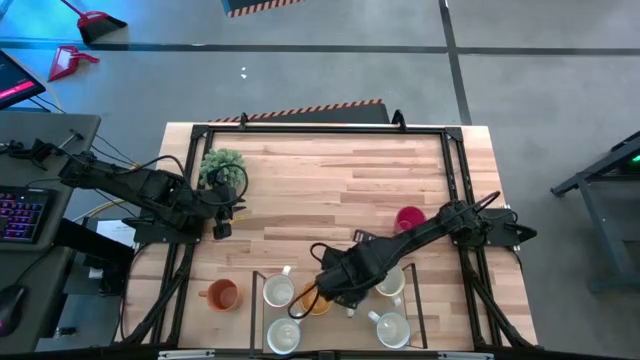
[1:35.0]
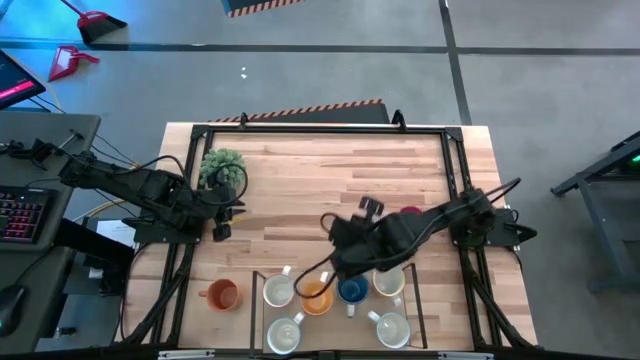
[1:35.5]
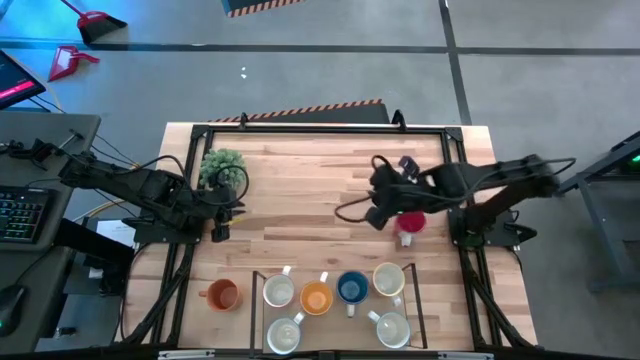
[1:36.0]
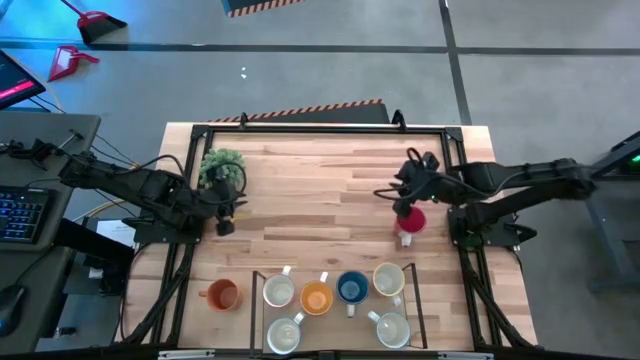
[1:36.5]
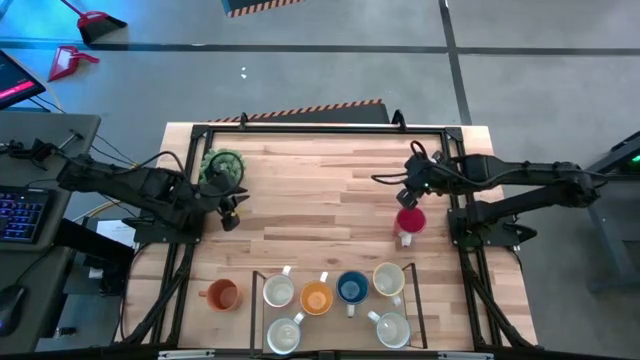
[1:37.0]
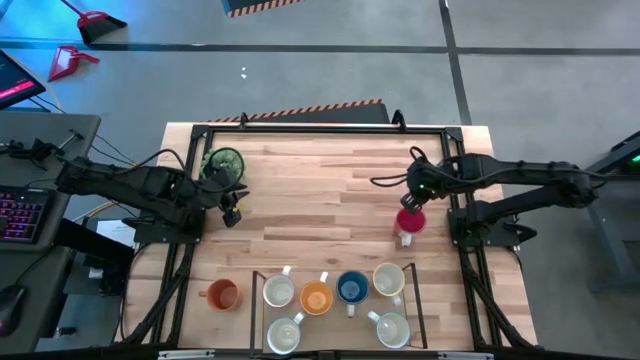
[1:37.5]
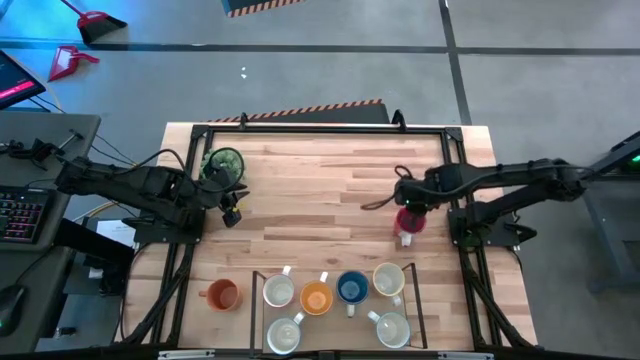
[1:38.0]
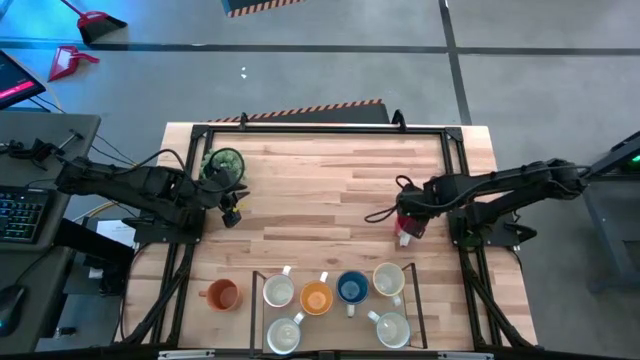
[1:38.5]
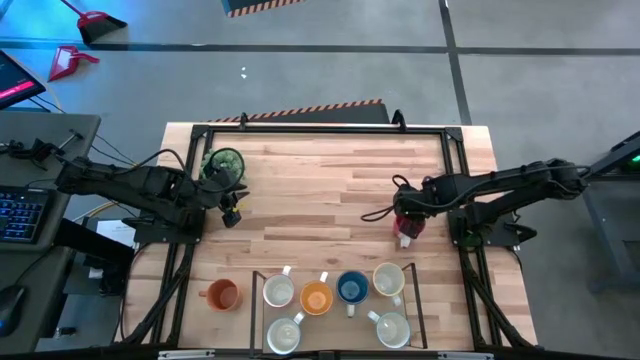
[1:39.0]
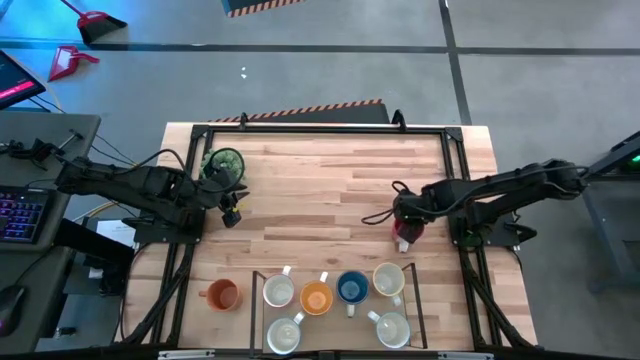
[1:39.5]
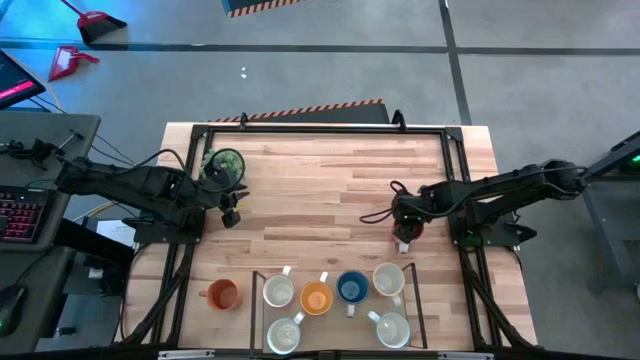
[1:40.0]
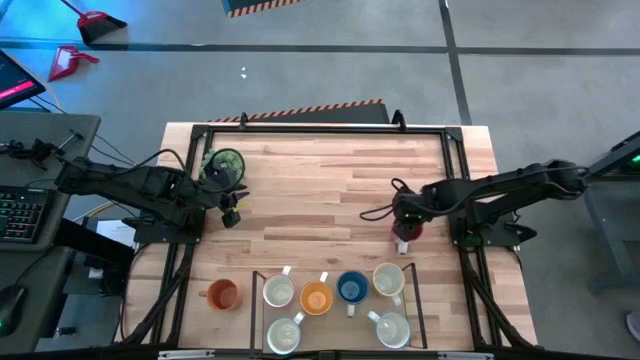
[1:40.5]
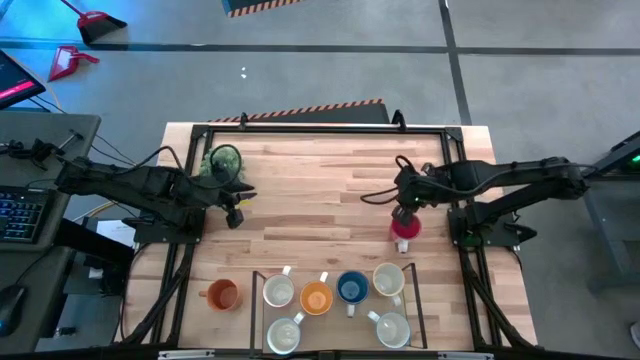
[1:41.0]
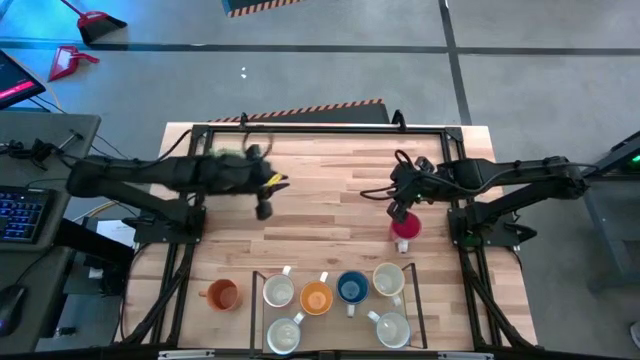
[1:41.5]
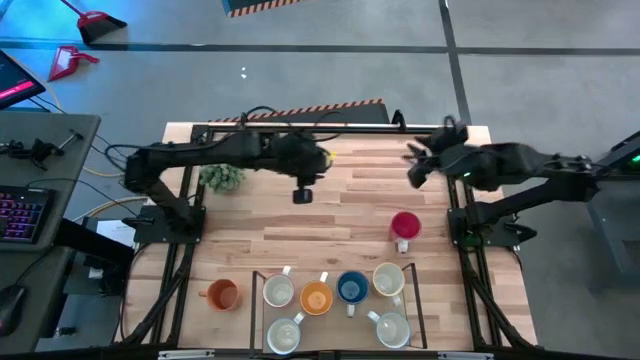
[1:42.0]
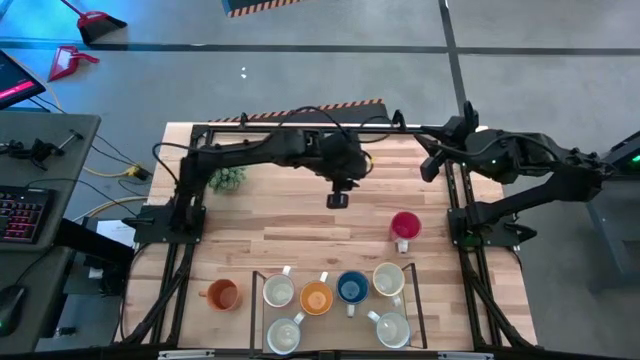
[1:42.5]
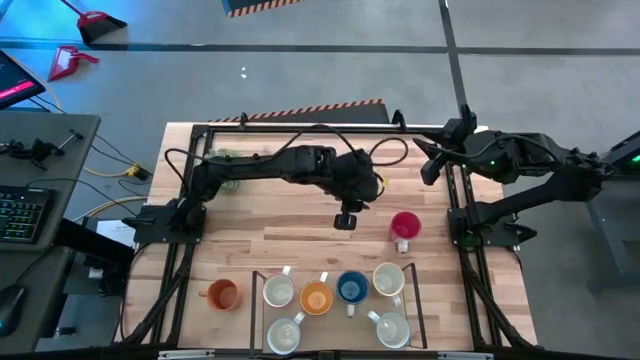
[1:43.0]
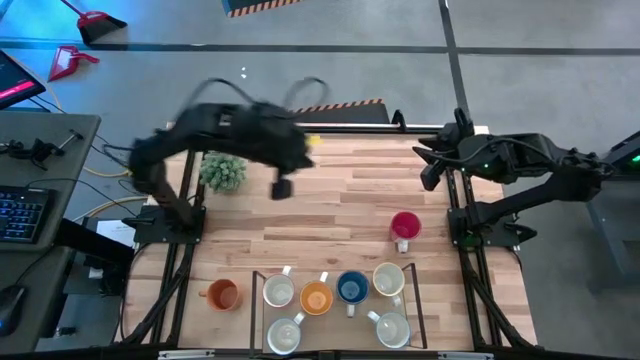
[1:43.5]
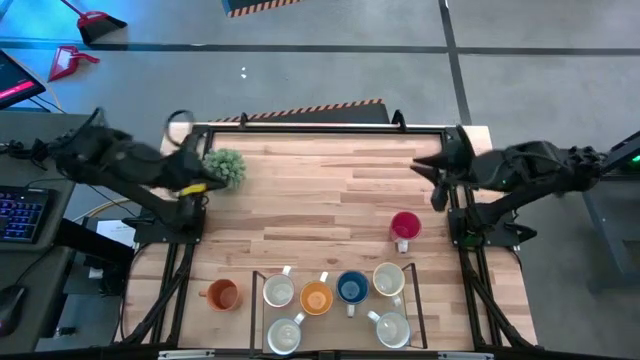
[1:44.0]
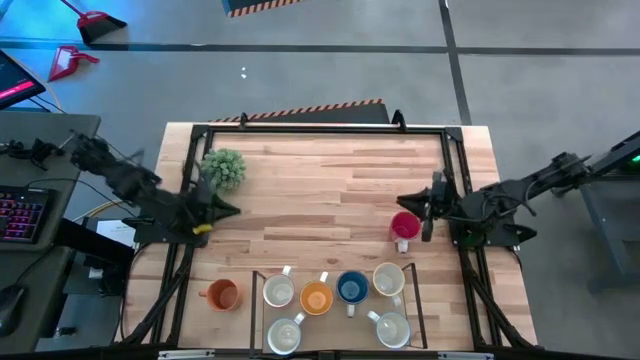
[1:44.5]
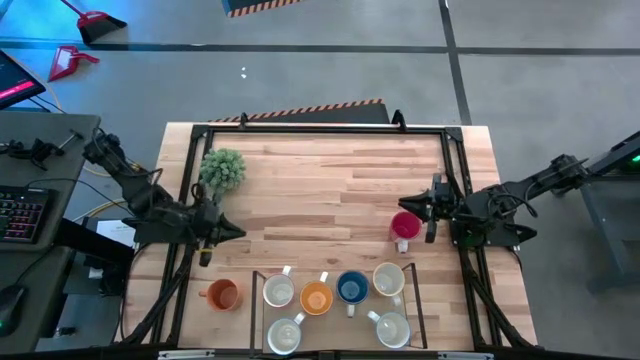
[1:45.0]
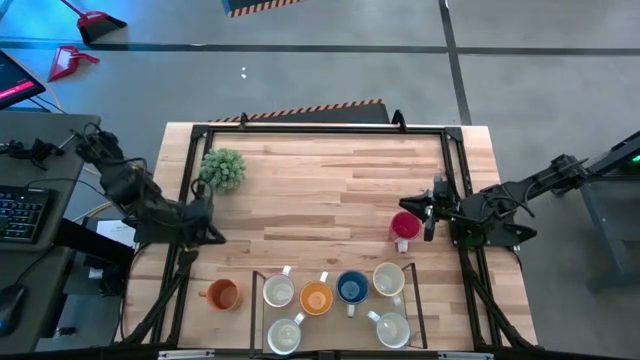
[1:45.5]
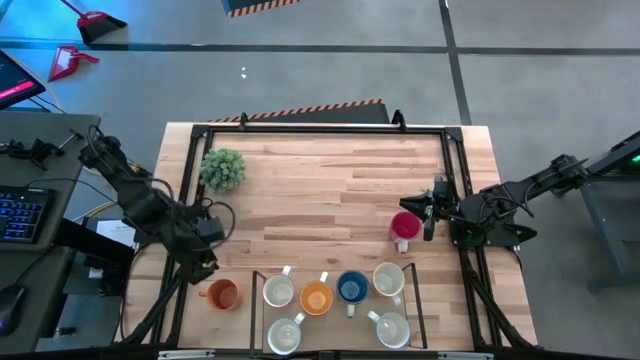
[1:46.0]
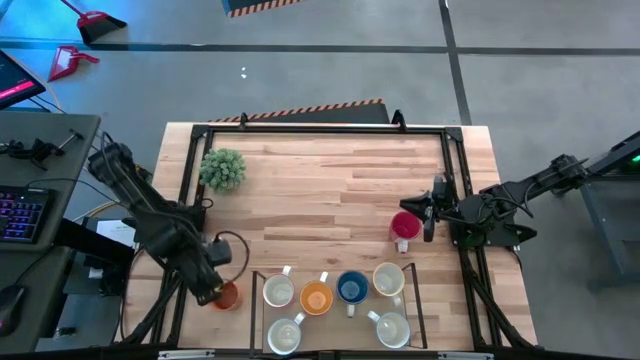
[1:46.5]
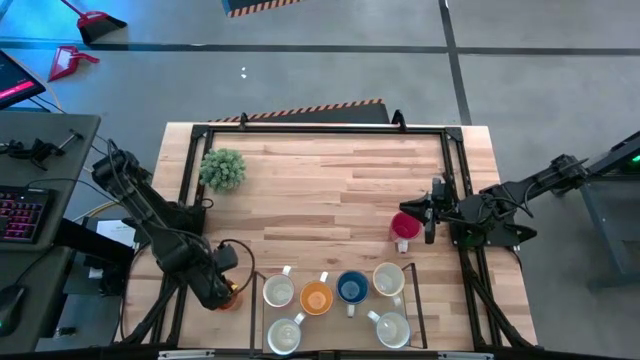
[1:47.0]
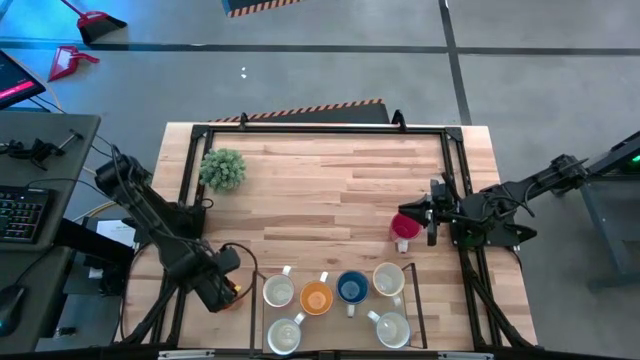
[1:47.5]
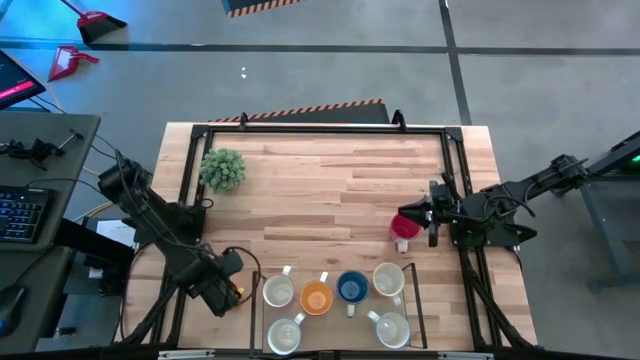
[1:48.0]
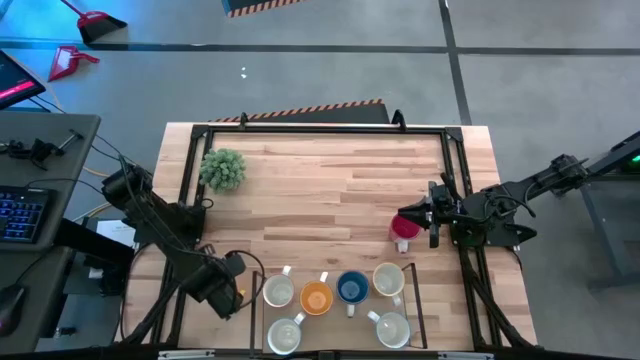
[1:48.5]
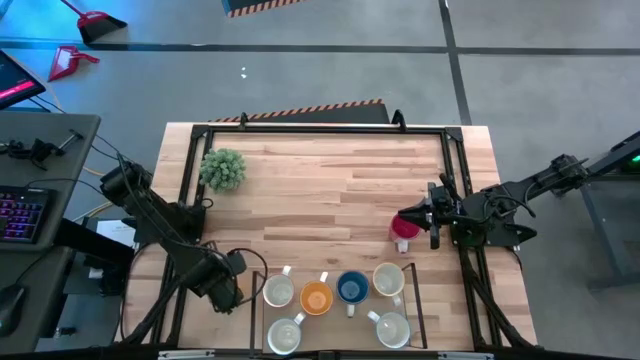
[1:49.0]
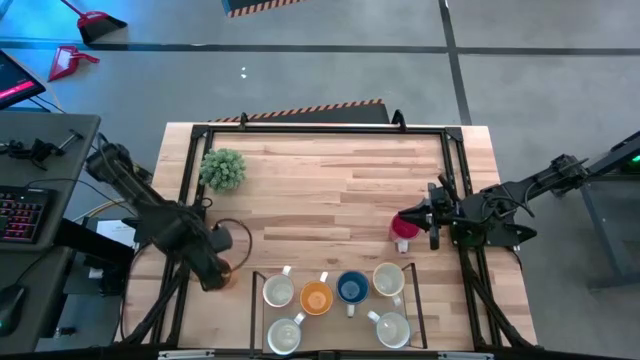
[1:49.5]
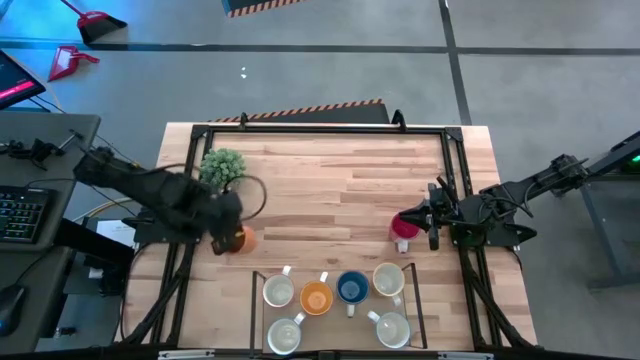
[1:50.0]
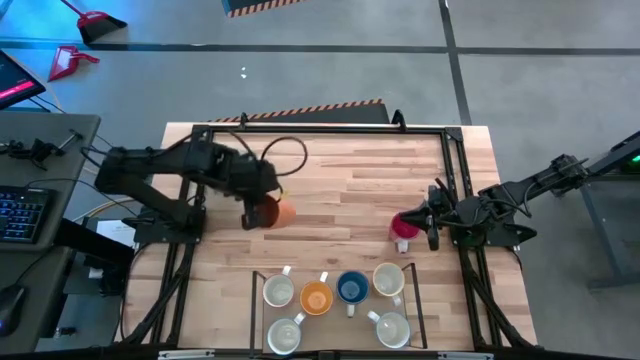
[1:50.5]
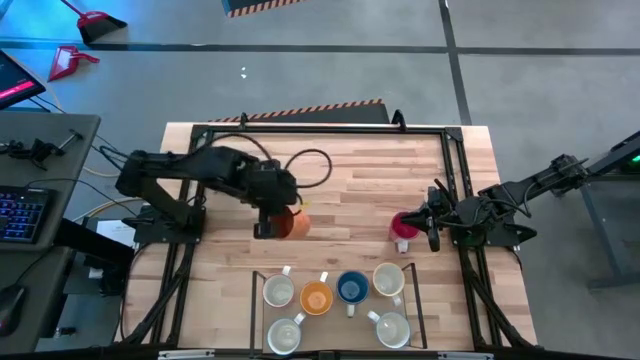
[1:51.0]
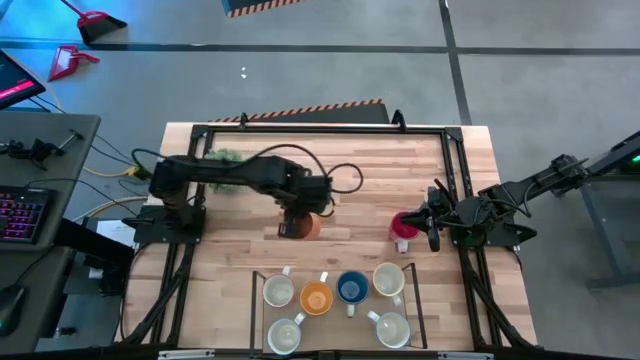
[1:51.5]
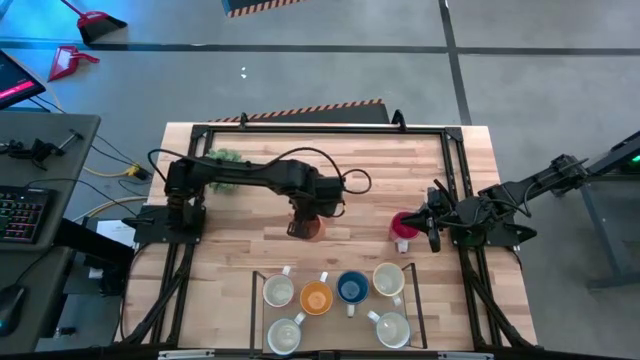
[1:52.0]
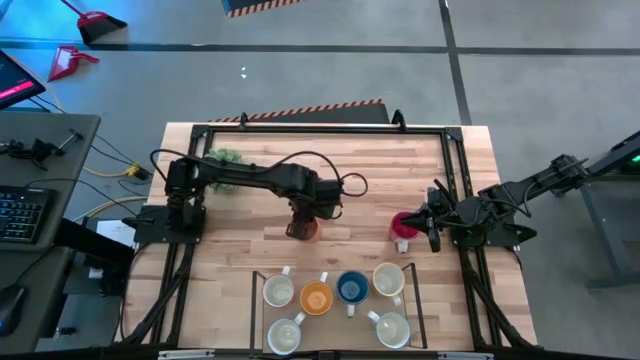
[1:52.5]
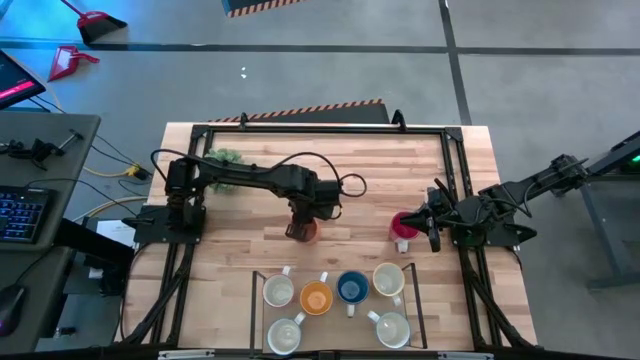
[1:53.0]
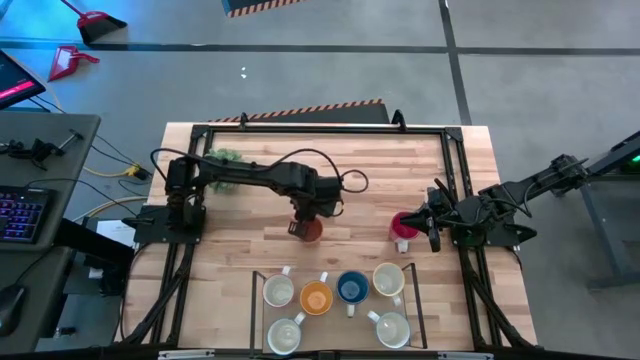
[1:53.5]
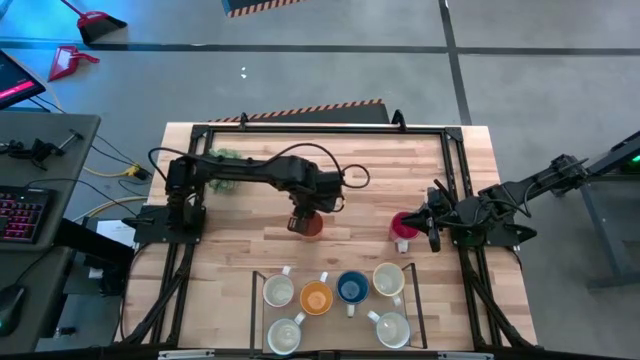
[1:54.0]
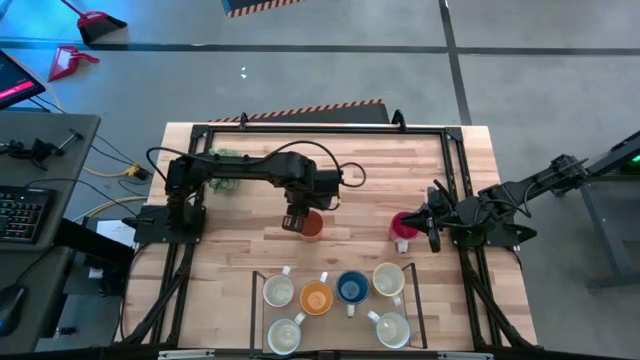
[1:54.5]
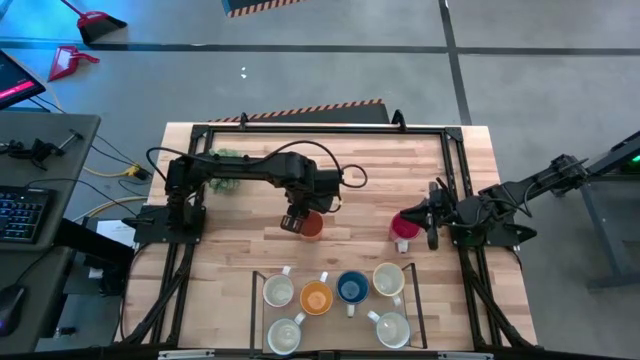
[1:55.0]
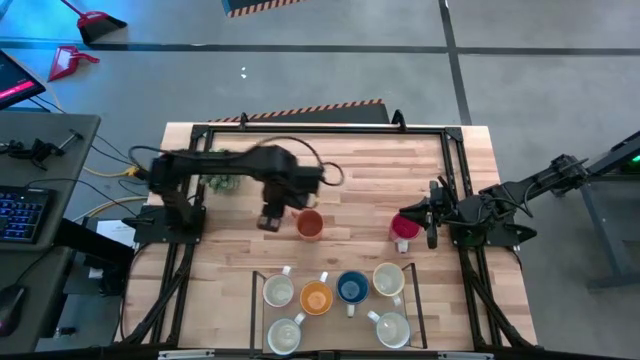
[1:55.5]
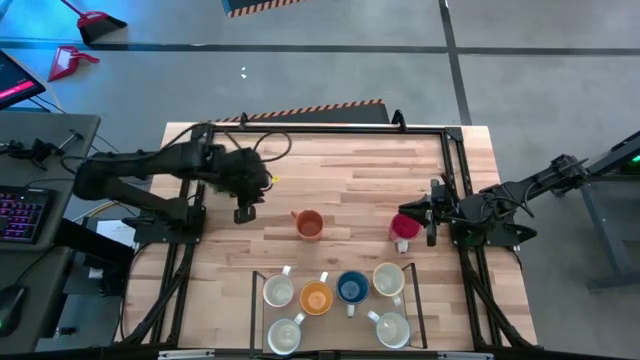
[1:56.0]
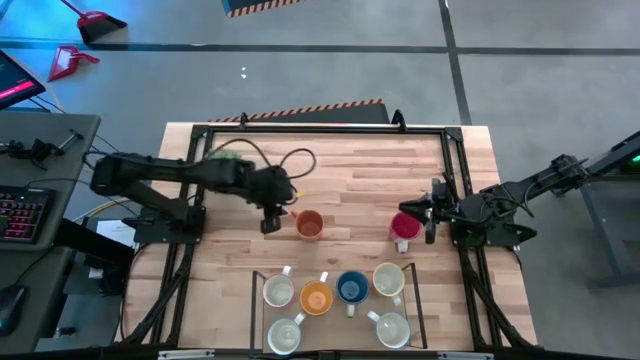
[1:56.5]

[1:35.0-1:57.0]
Task: Place coffee mugs
Put the orange mug on the shelf
